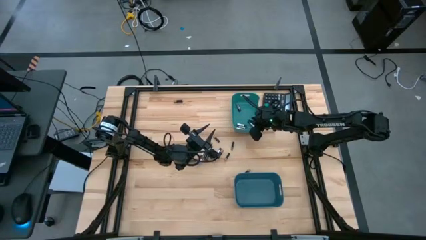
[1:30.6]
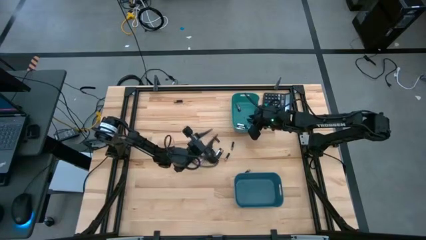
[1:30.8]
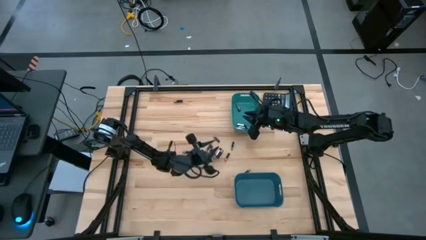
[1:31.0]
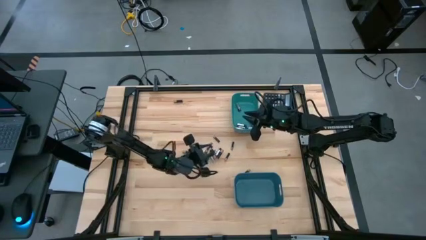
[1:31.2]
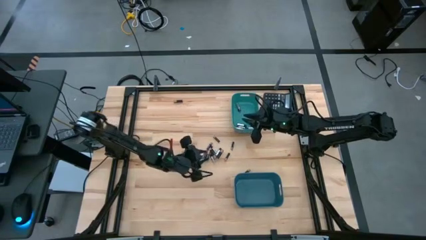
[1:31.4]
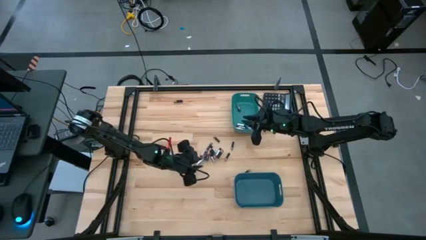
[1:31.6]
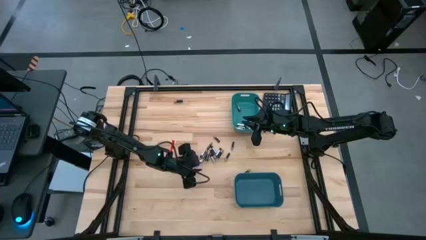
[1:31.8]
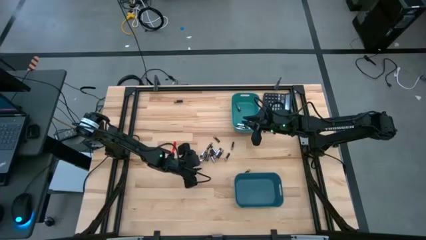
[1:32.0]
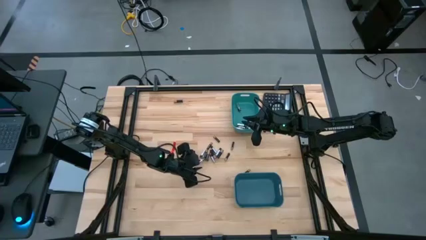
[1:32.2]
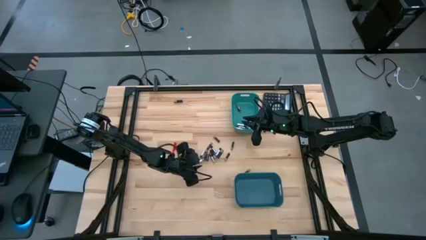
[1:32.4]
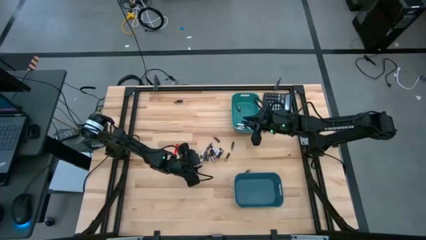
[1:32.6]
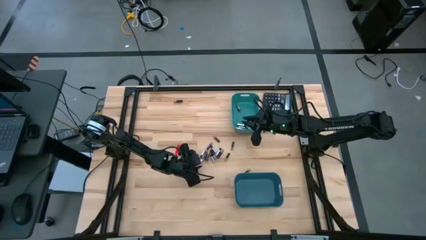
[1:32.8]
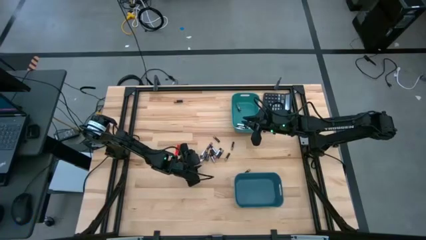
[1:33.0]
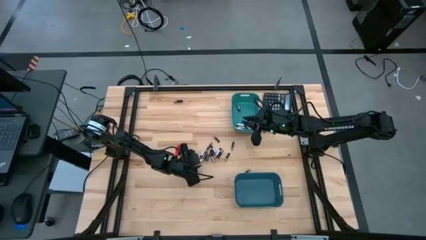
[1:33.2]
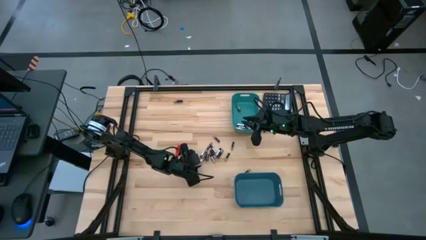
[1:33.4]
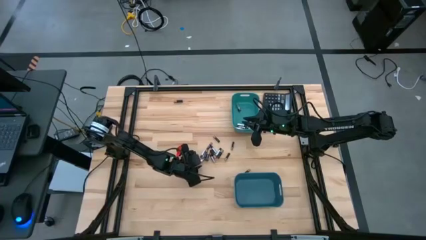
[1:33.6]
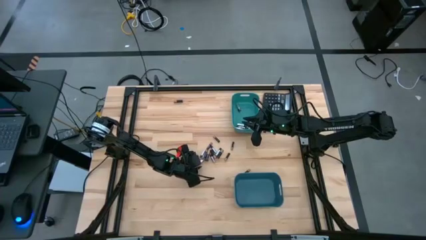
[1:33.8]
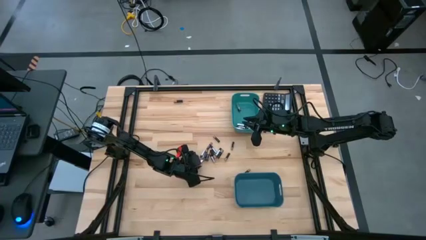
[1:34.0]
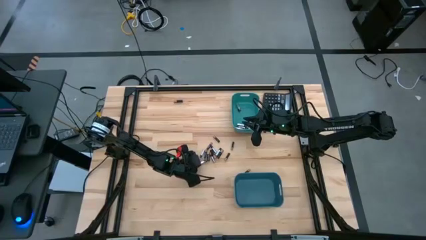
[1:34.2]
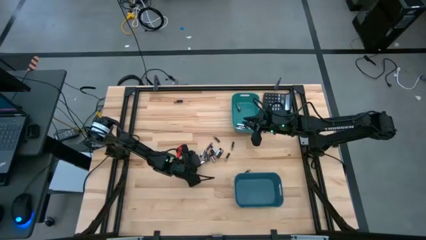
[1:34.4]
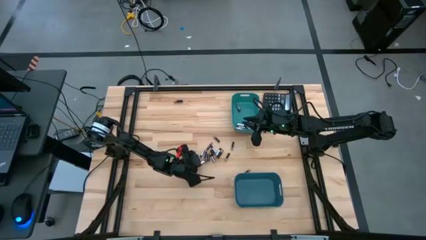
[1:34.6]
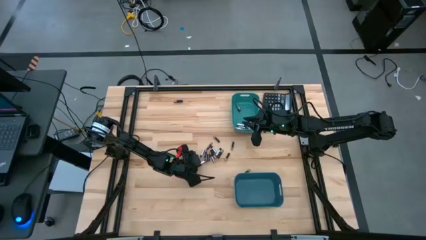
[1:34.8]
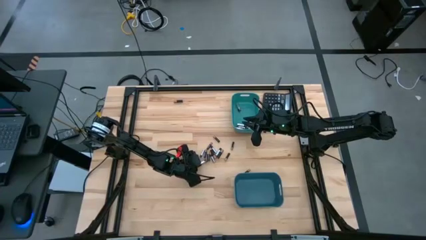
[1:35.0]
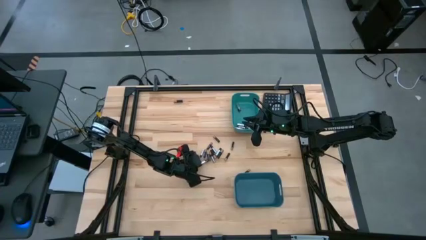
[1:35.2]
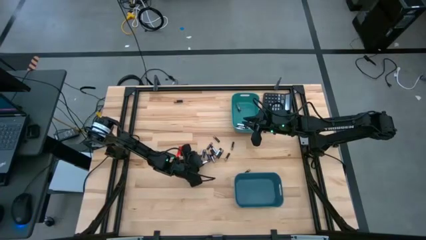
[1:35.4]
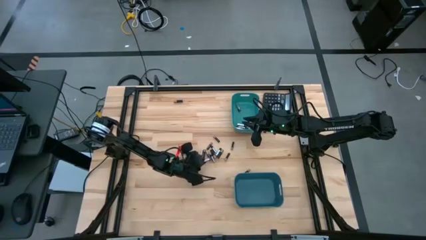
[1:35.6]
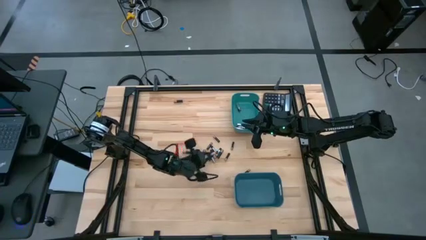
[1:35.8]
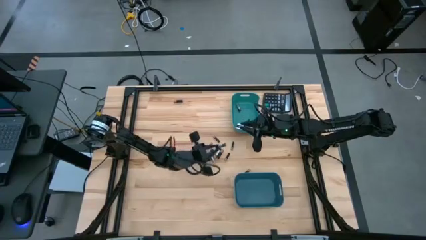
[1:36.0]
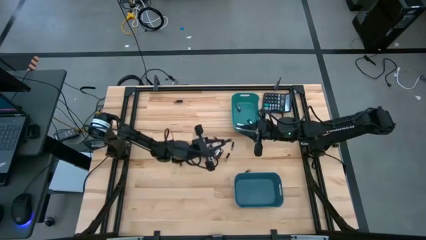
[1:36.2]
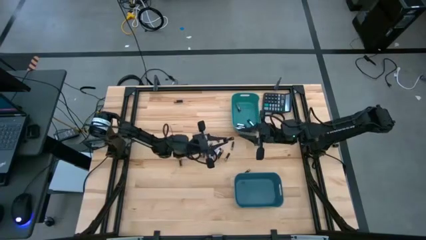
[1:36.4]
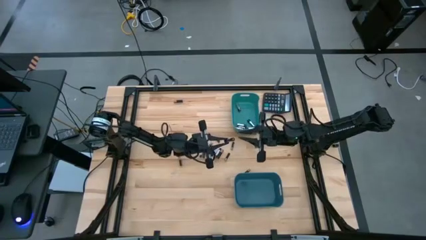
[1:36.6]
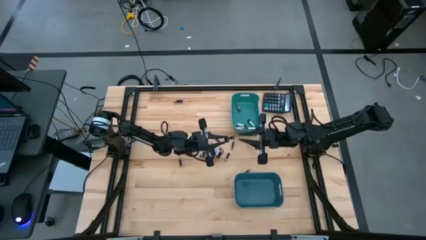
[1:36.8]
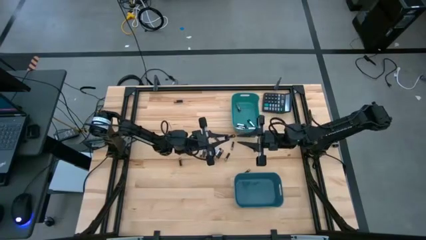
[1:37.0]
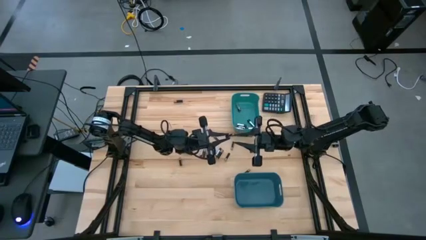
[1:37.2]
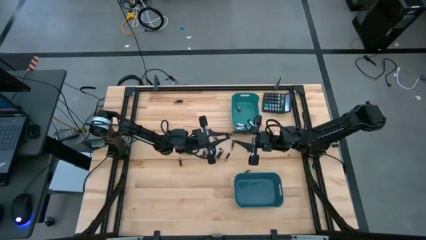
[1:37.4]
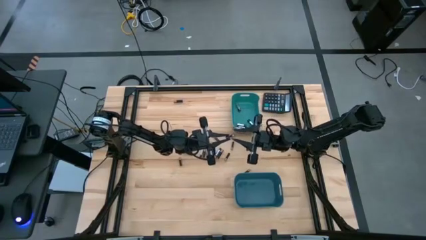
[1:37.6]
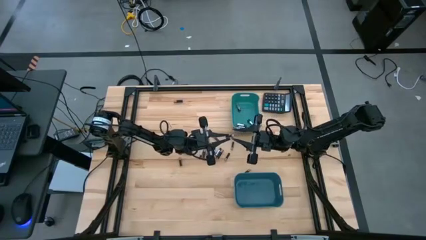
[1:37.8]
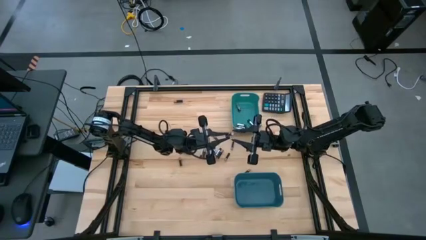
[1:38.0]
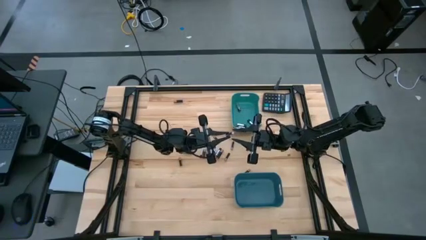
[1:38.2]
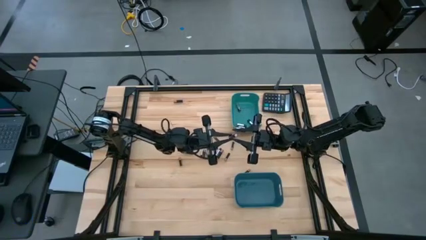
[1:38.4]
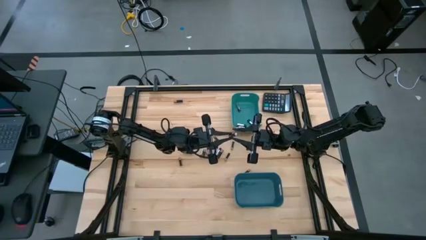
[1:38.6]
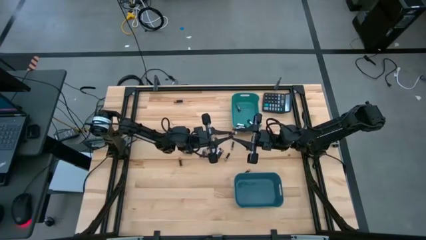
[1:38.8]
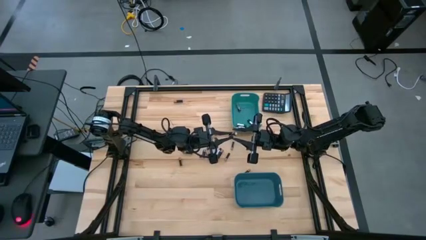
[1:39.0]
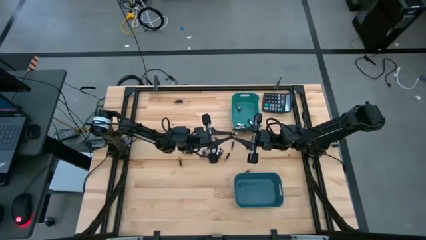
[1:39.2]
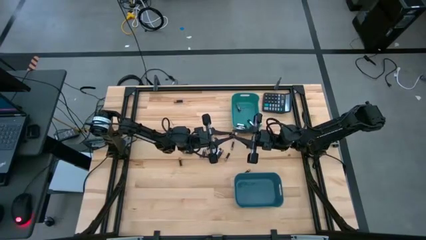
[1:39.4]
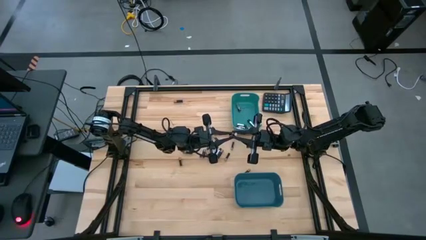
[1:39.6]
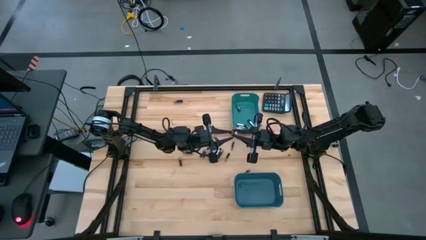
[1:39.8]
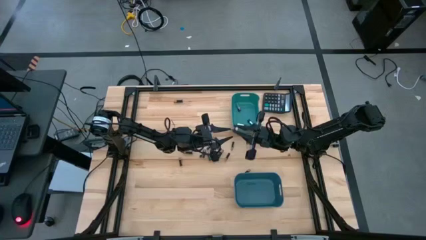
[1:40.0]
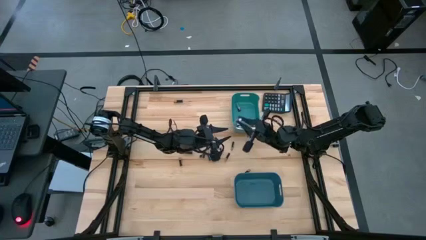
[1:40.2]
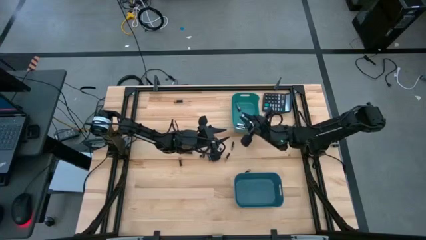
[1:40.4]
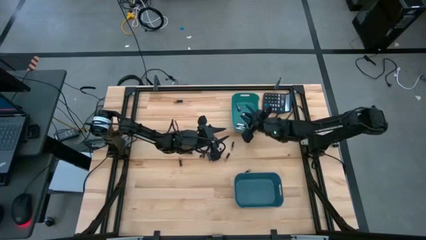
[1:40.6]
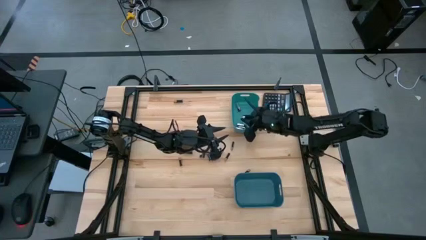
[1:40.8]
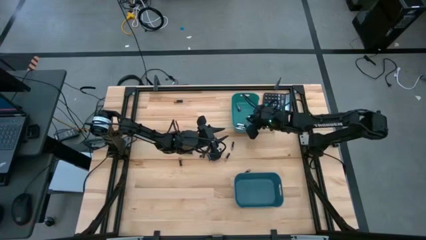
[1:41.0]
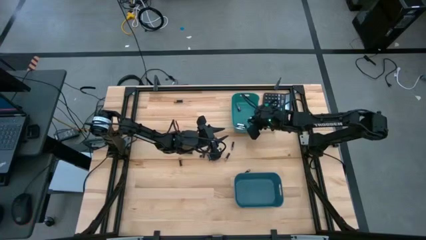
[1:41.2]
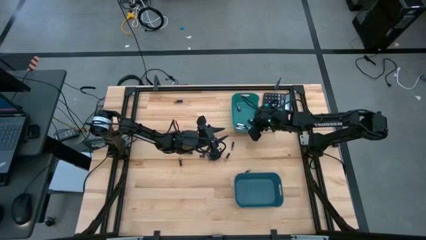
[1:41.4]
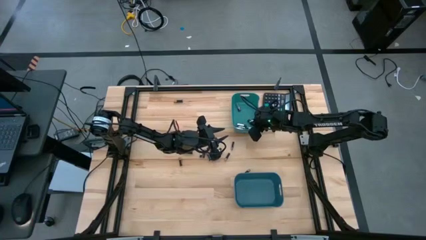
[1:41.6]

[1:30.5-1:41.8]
Task: Sort batteries
Put the silver battery into the green bin

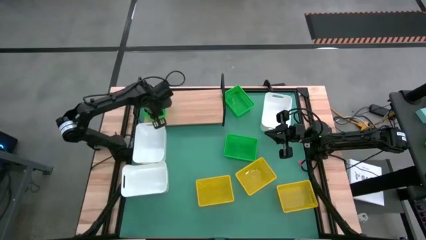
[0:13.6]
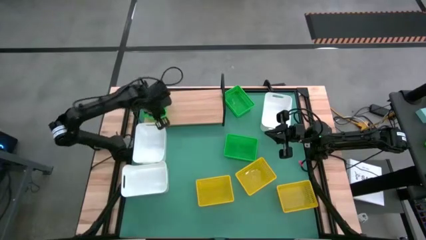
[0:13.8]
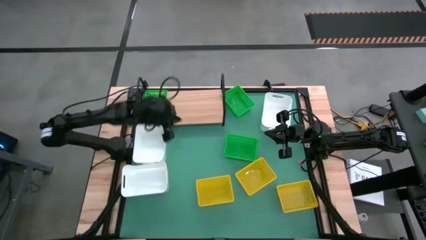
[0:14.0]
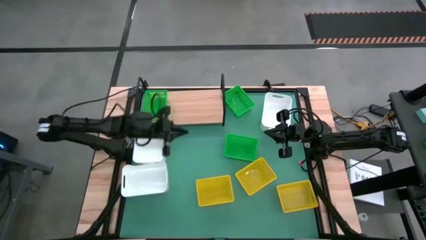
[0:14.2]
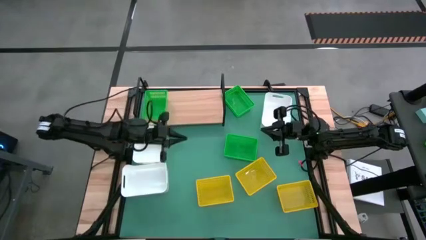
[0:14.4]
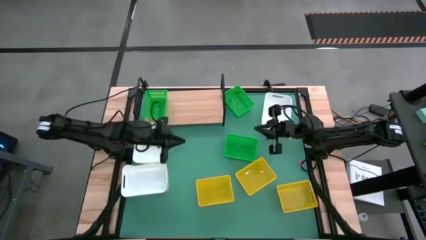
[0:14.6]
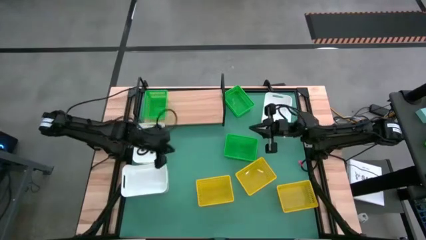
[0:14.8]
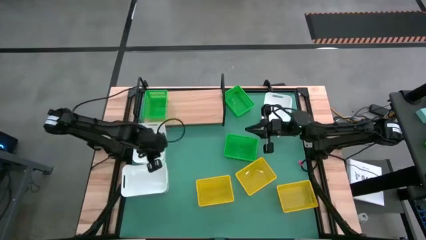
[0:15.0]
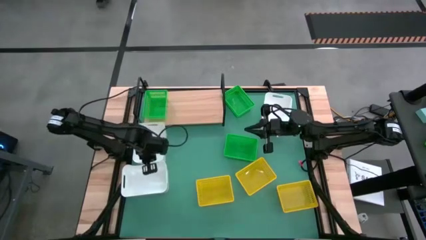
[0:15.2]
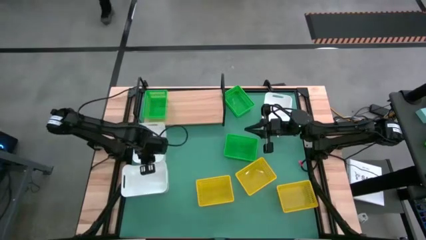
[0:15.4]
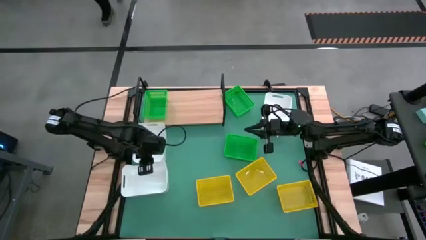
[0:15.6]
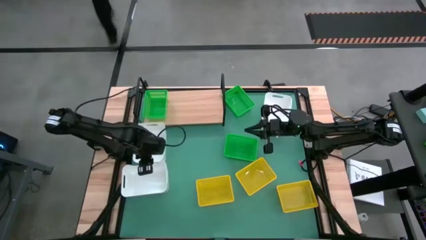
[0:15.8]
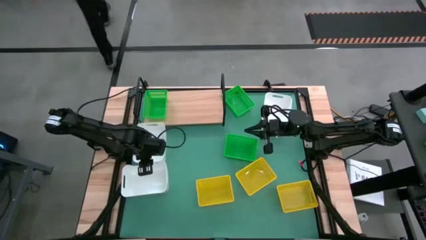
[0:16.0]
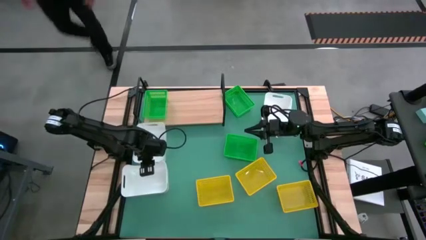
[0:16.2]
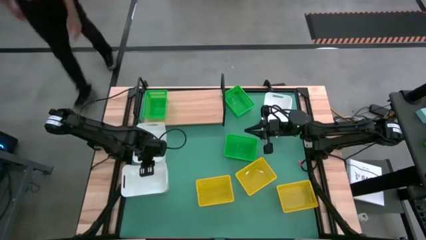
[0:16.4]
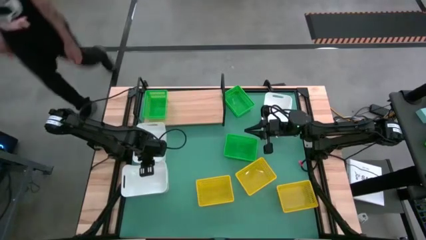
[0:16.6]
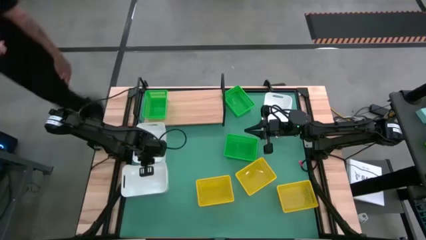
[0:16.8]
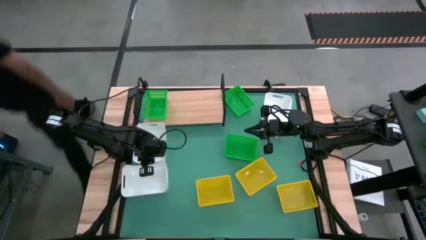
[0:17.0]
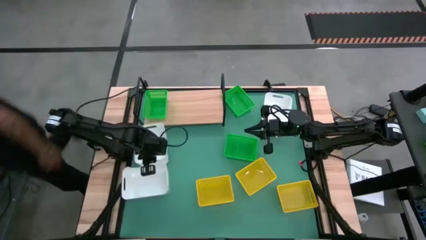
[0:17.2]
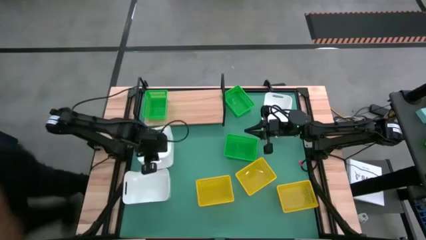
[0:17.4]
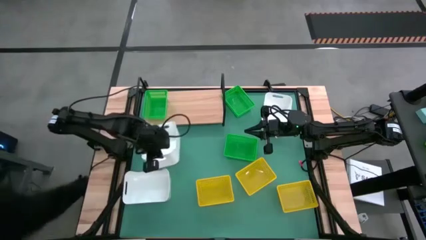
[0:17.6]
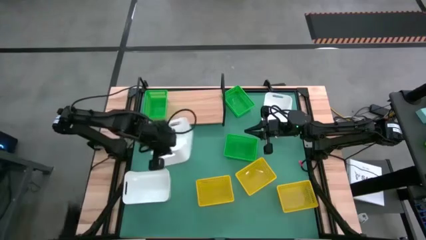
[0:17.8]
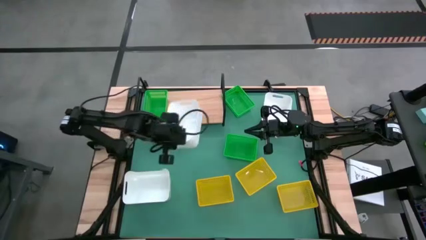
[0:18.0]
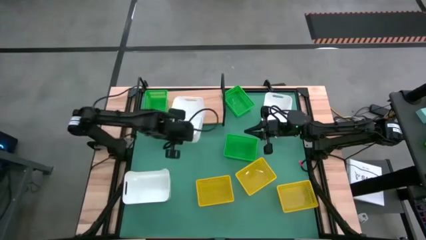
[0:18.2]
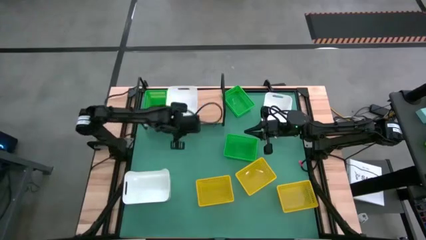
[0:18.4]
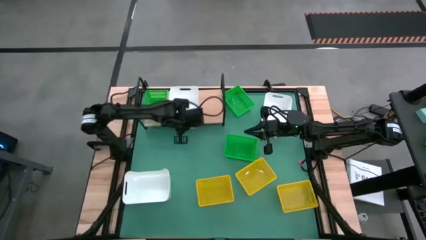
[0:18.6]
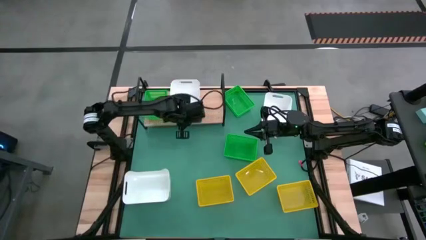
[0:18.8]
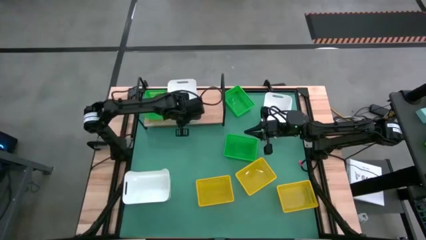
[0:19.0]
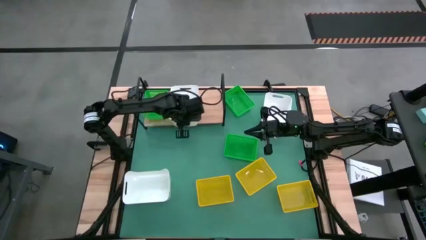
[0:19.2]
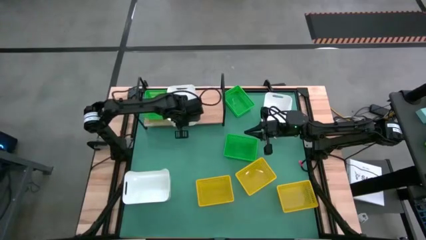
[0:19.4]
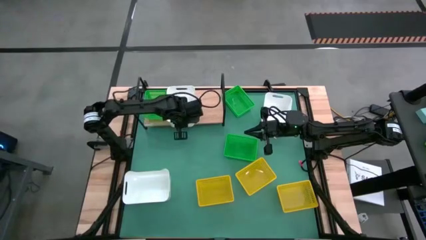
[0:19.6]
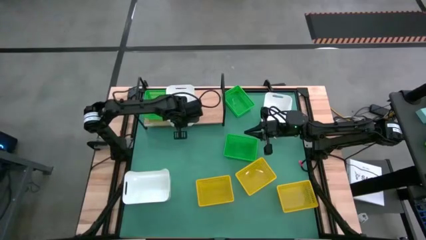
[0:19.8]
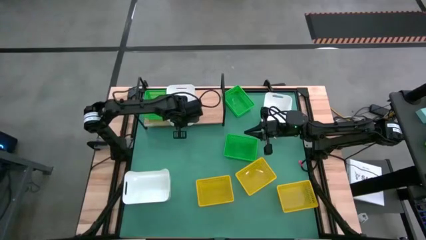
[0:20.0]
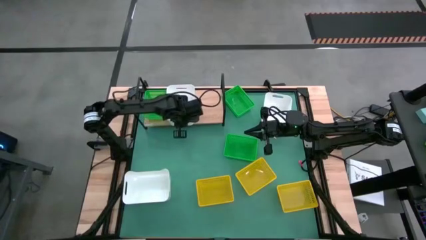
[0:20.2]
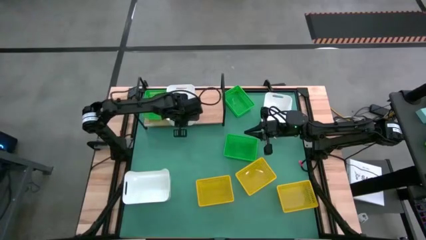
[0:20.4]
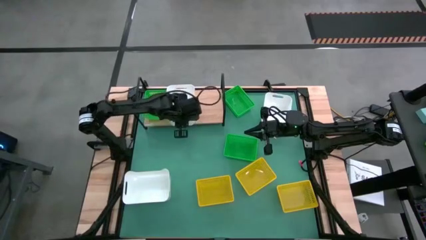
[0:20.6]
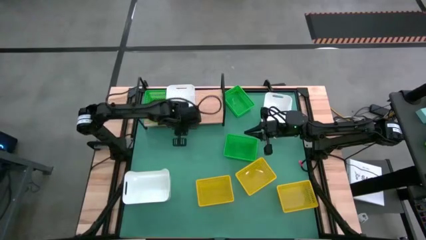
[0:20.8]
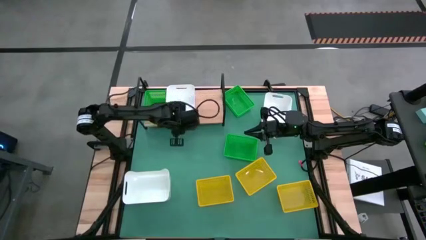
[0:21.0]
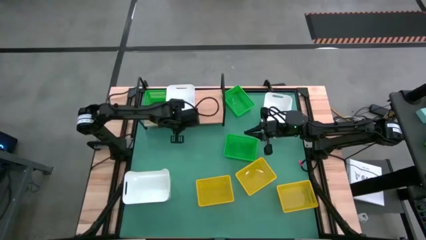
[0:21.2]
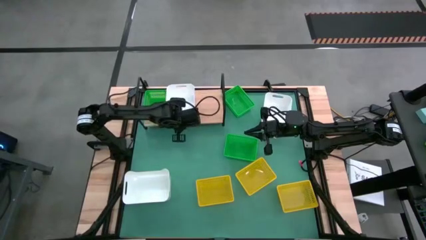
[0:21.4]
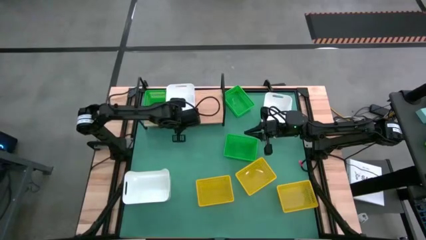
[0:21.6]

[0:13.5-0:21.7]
Task: Stack baskets on shelf by color
Put the middle white bin on the shelf
